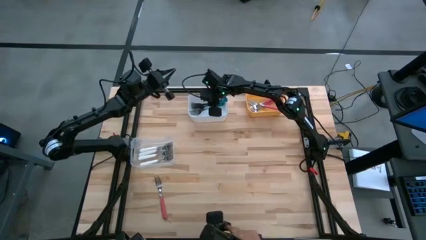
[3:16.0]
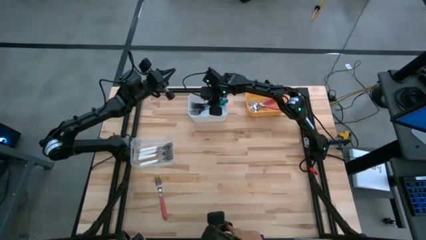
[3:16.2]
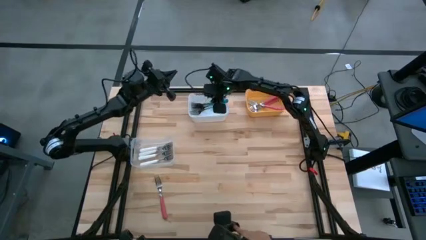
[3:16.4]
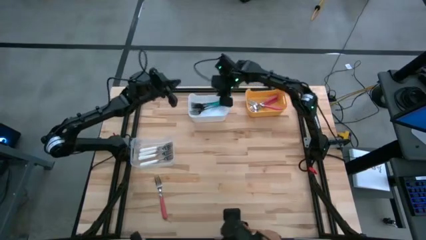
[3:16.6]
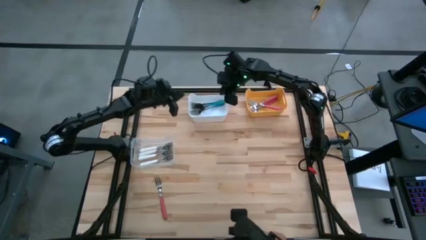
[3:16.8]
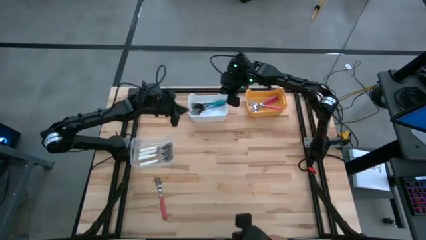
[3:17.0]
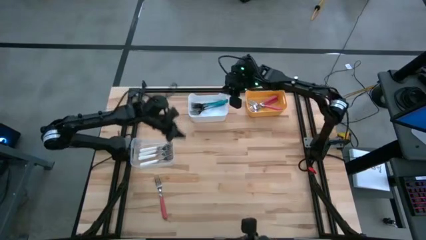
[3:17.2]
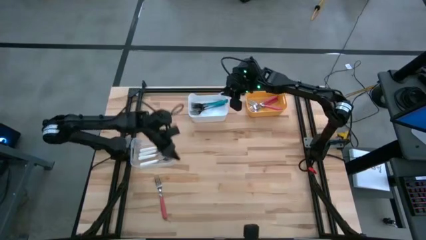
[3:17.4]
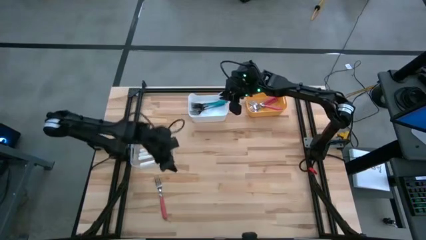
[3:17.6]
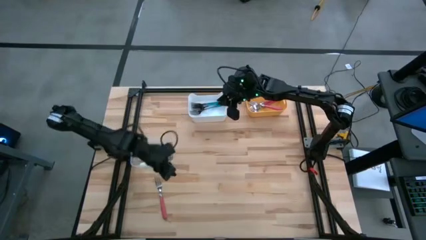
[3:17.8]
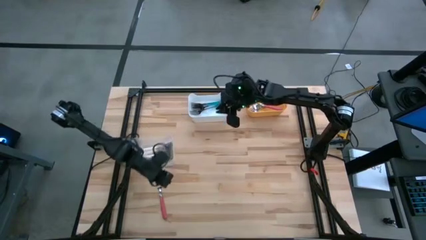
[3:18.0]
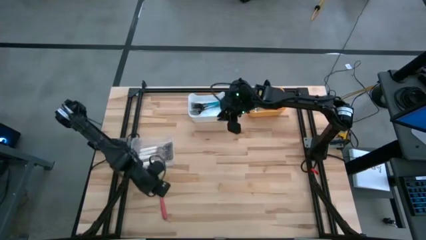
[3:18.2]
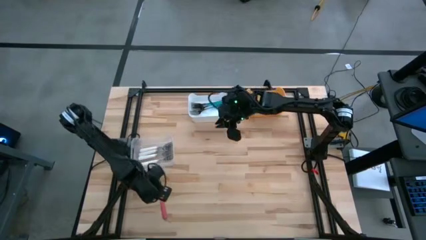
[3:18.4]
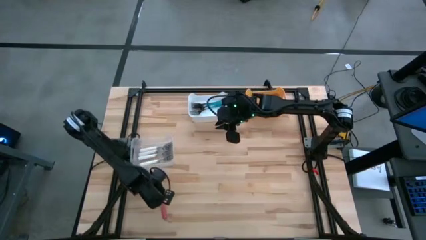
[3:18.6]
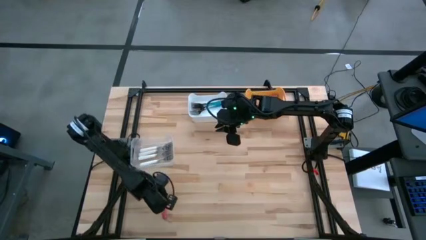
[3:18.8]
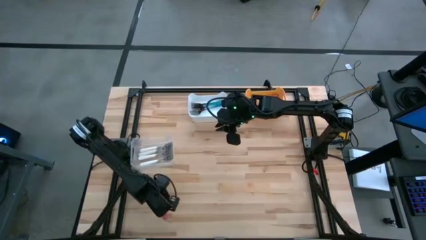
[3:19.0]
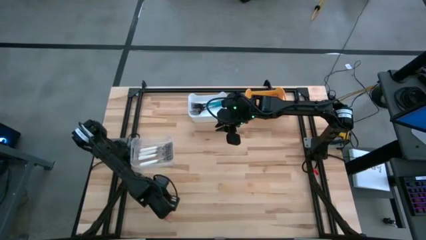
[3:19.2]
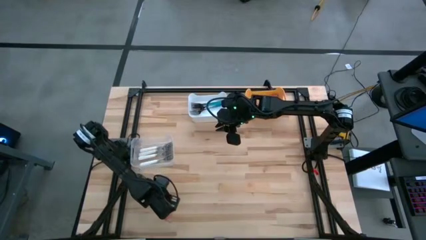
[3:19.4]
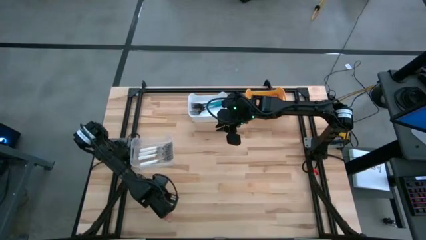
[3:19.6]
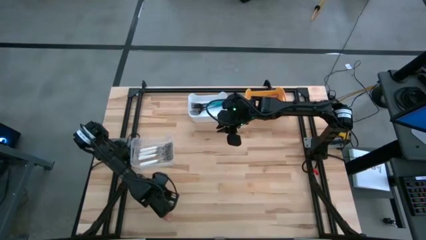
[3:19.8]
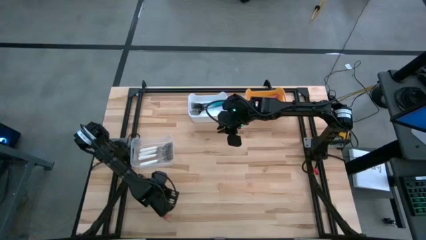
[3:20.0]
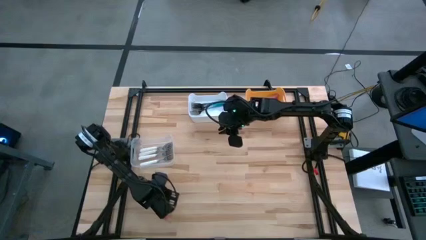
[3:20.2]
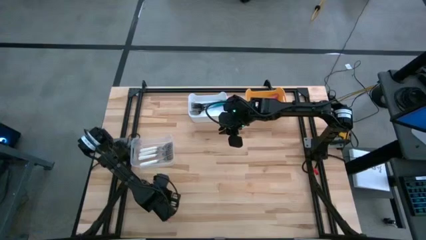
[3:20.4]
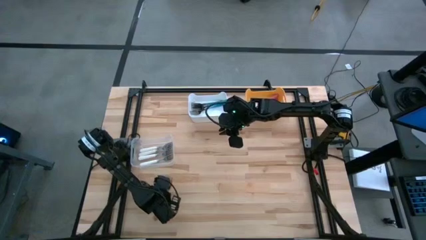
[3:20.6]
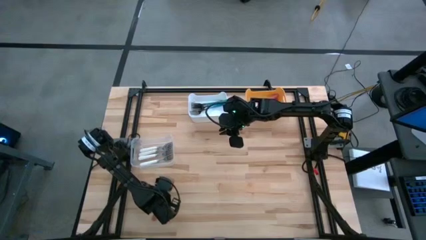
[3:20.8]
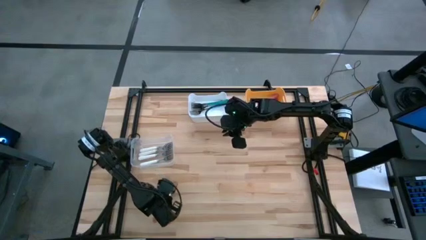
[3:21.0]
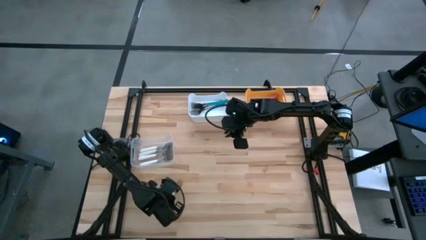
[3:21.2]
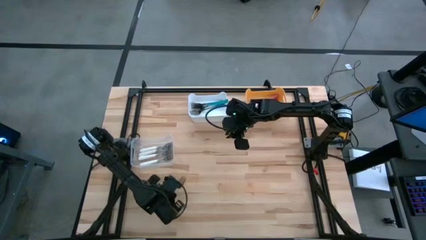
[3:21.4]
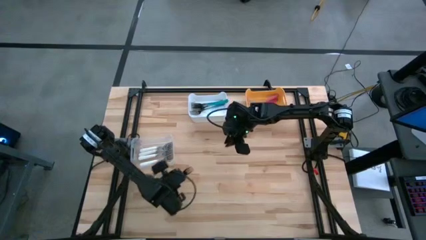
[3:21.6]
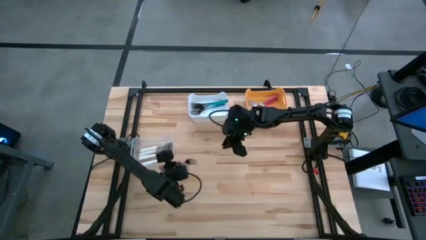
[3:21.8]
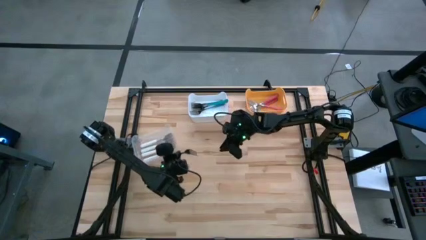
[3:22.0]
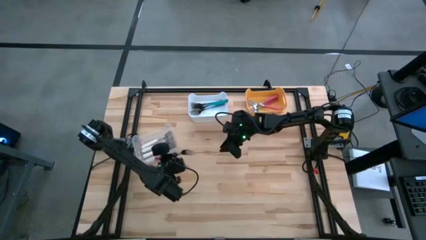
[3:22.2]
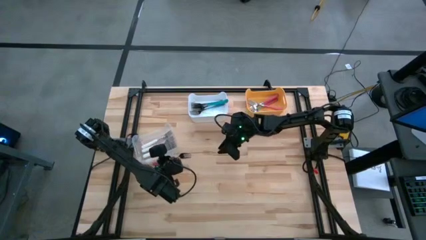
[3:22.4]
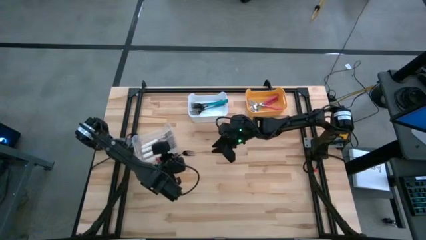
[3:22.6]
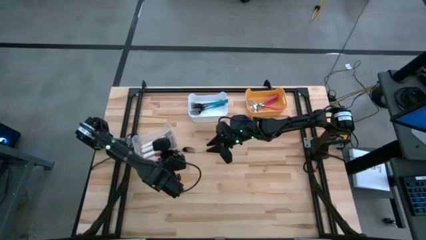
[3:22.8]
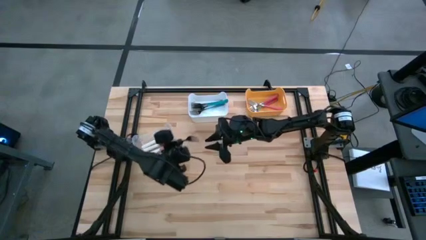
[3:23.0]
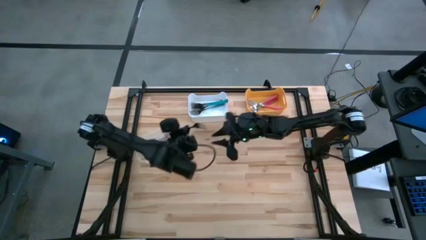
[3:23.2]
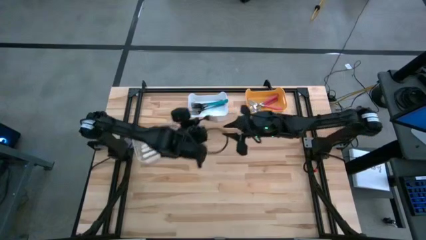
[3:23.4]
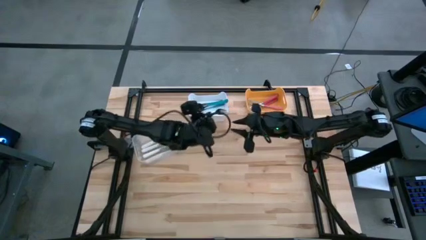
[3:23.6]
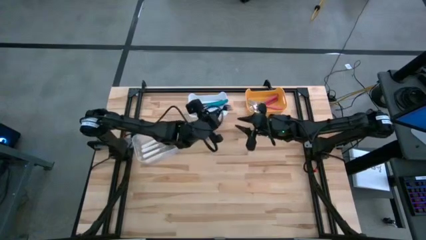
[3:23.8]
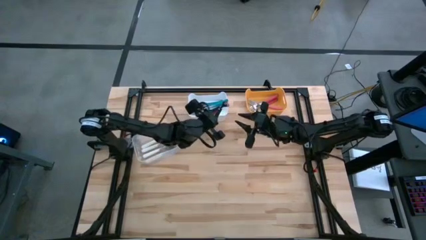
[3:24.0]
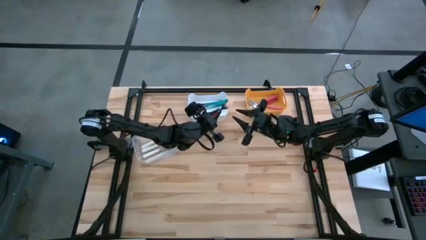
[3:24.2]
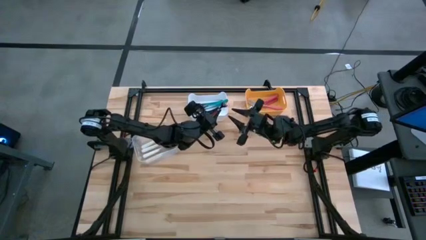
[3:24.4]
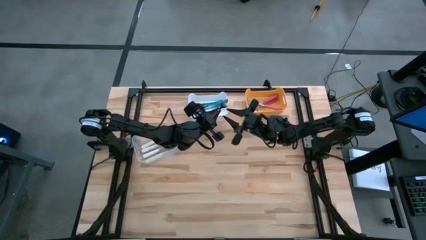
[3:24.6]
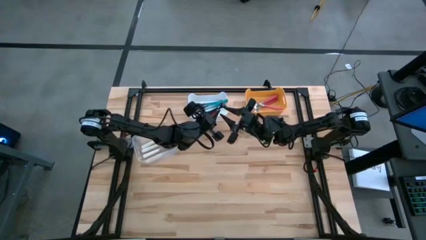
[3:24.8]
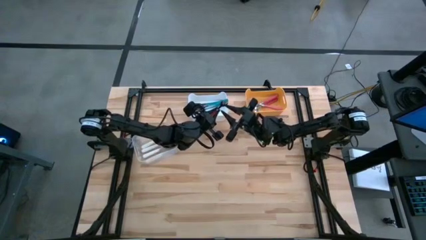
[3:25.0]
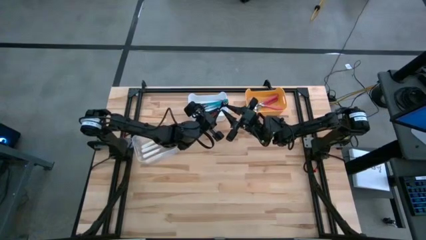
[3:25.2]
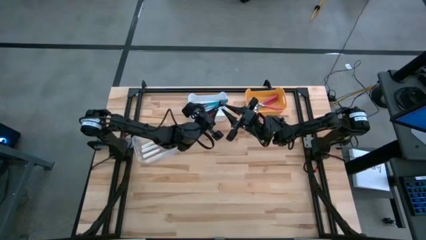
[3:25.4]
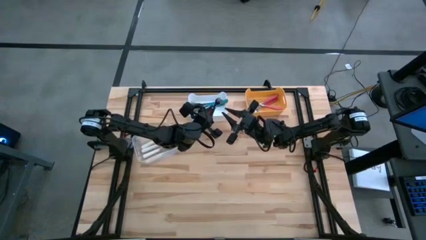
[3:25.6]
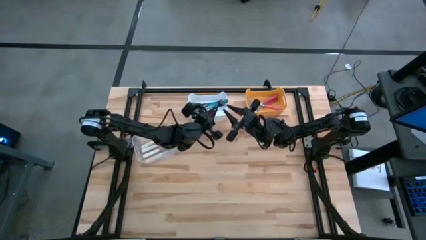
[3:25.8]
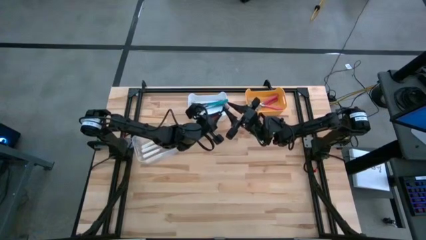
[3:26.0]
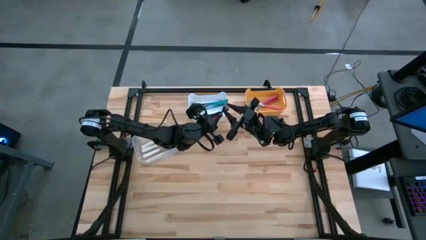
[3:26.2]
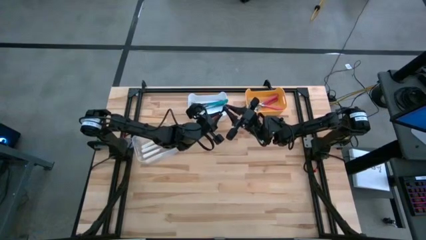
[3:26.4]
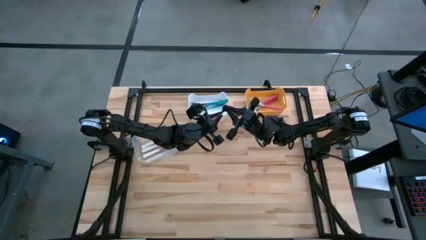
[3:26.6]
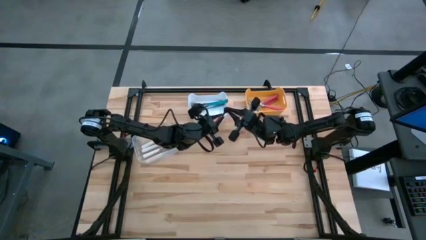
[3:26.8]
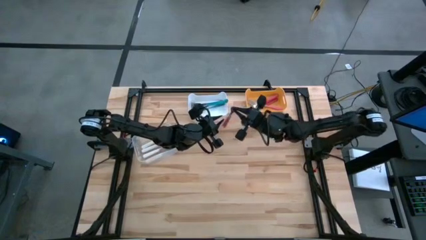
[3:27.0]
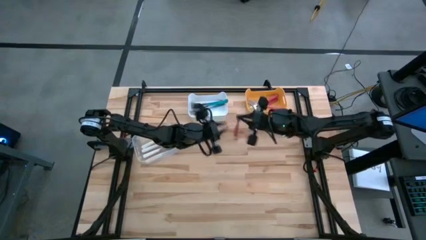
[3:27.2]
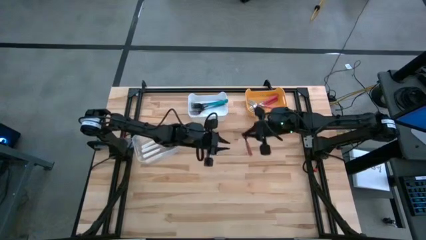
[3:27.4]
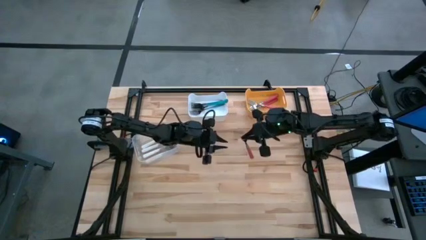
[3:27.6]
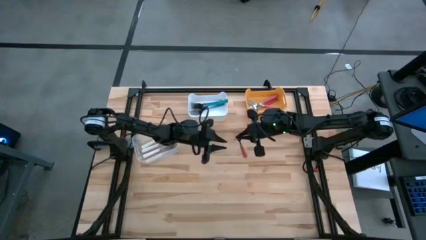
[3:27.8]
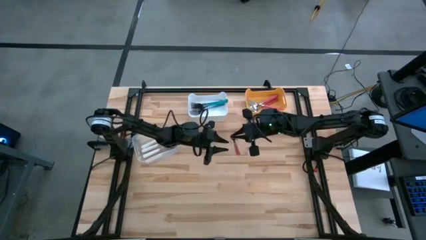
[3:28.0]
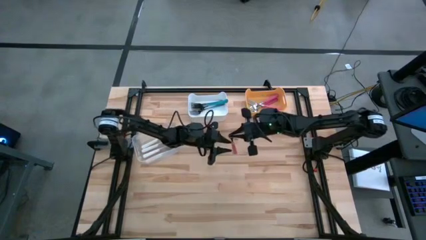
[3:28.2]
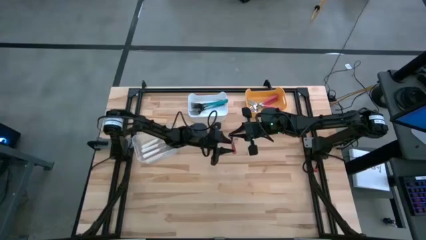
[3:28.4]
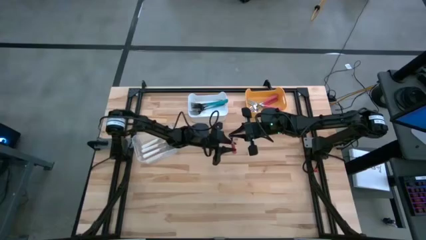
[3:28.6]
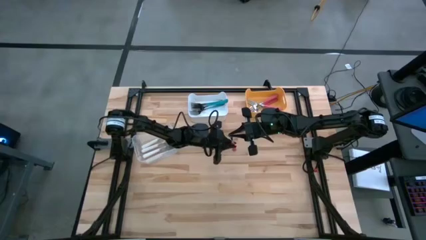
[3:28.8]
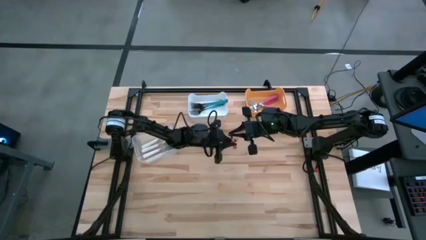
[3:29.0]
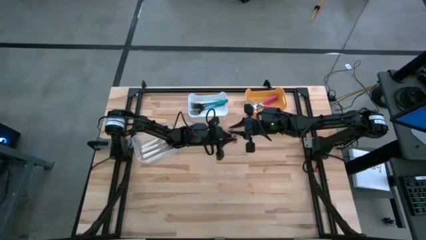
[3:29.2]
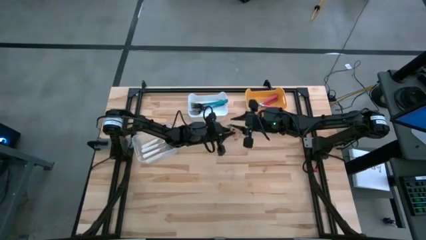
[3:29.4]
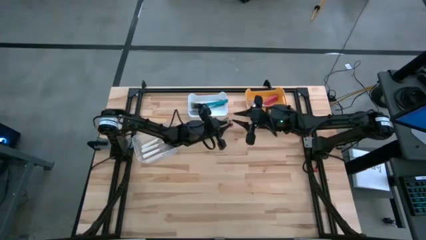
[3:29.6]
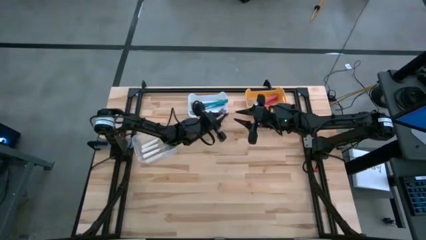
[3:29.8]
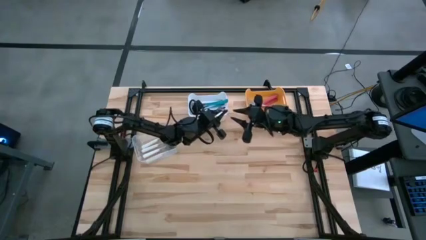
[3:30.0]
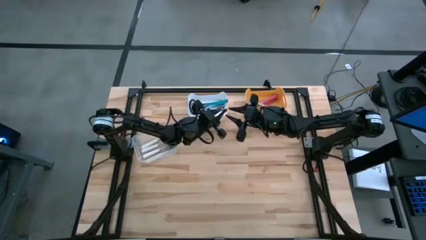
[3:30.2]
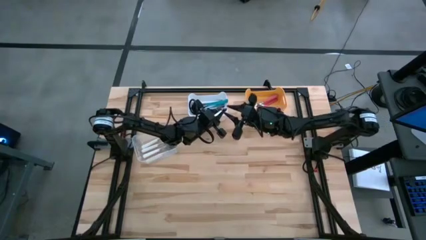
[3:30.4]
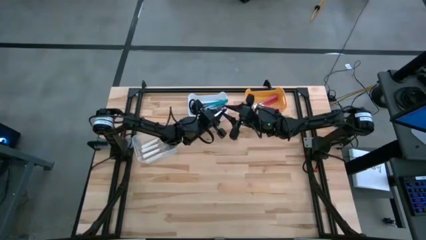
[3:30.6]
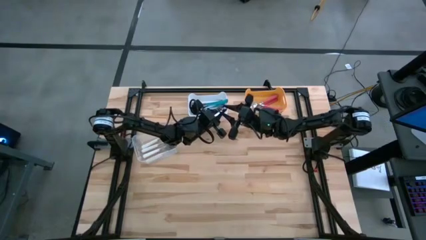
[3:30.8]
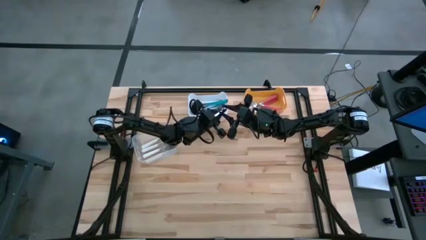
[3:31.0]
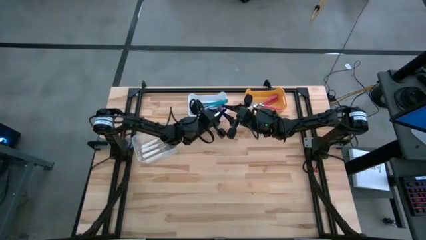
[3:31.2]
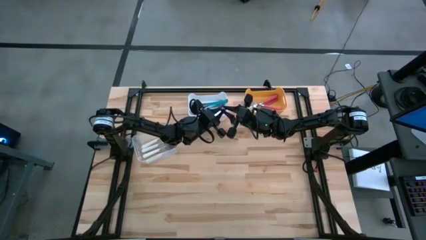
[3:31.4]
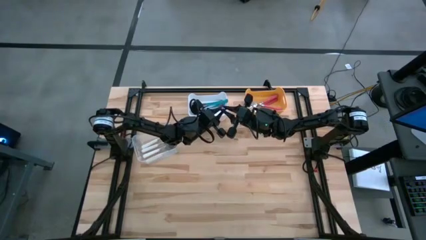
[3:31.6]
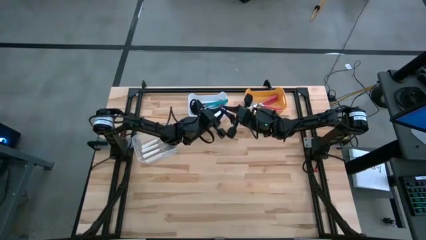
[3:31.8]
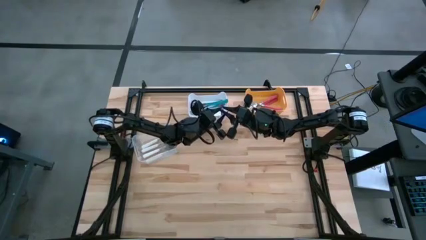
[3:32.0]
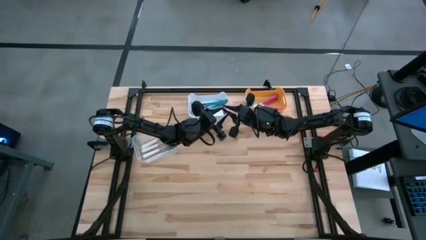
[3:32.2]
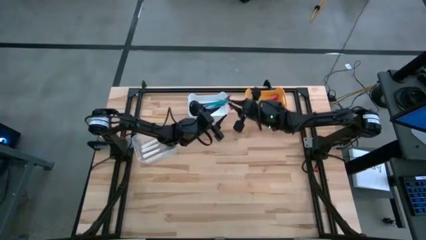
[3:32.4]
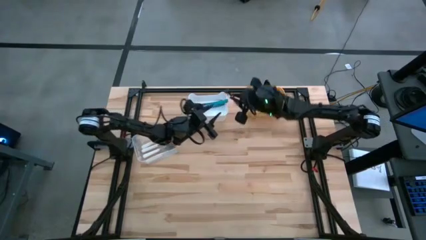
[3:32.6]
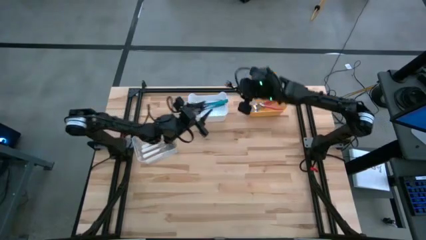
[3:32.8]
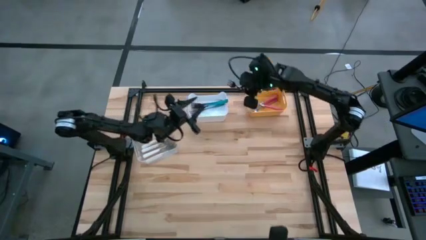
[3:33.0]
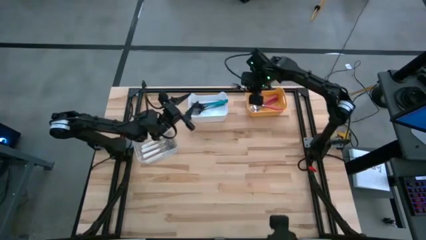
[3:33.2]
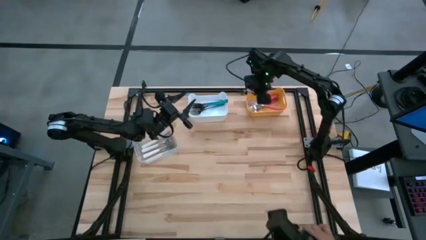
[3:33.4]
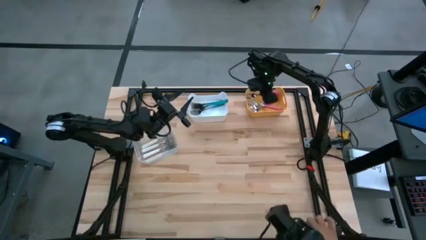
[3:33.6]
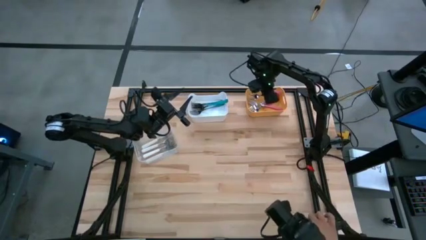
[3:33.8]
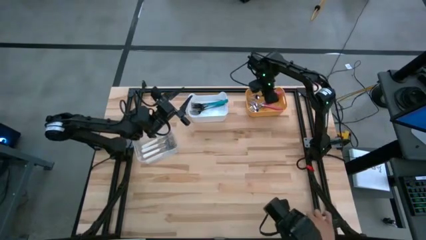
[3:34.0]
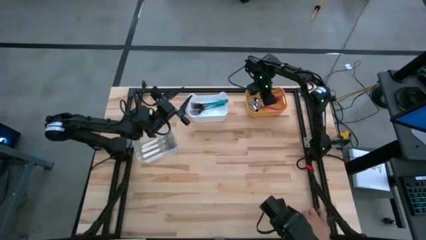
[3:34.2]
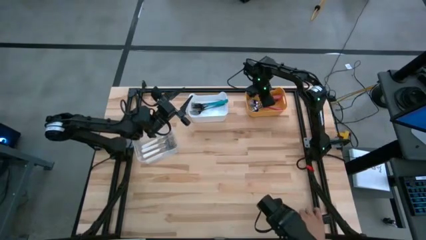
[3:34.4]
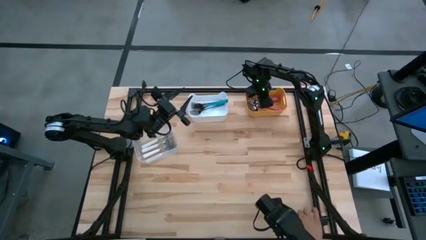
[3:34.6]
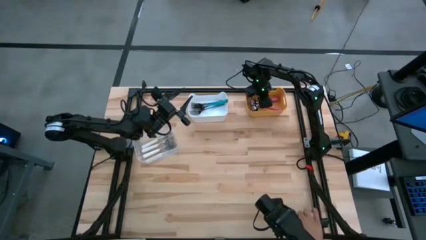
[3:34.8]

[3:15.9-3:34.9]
Task: Sort silverware by color (type)
Put the pink fork into the yellow bin
